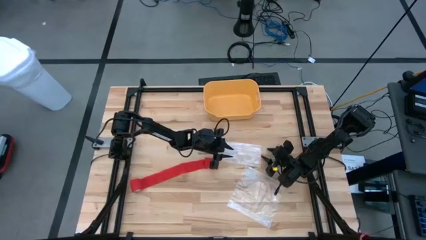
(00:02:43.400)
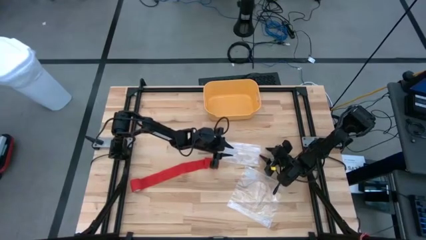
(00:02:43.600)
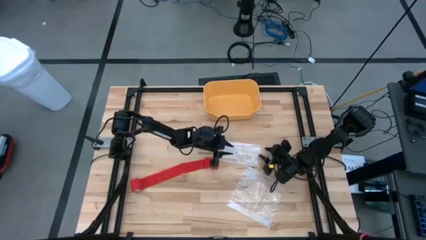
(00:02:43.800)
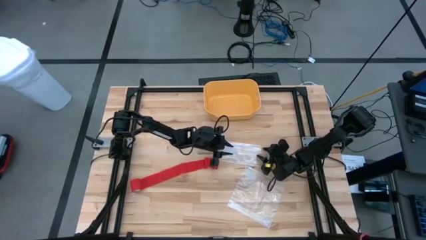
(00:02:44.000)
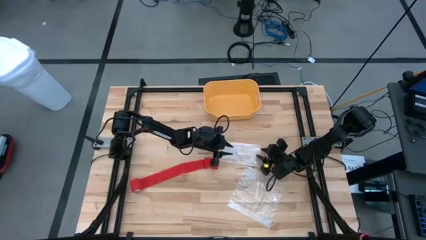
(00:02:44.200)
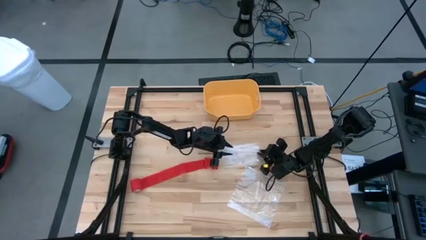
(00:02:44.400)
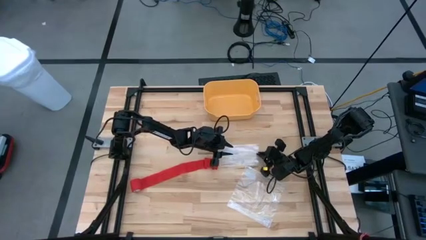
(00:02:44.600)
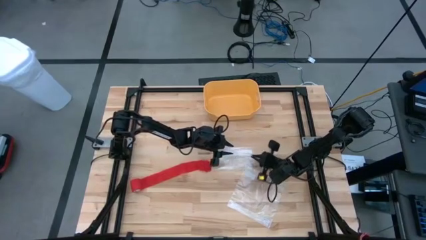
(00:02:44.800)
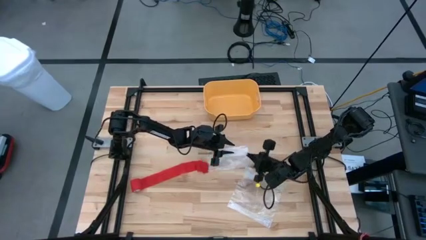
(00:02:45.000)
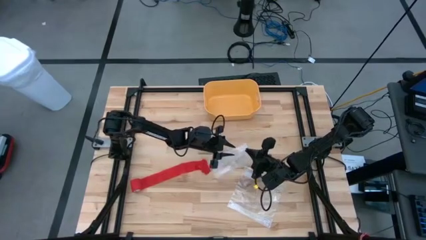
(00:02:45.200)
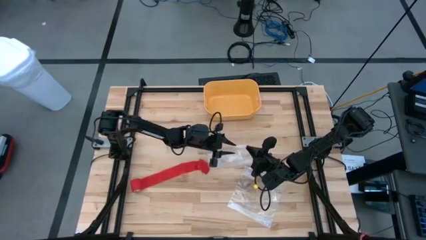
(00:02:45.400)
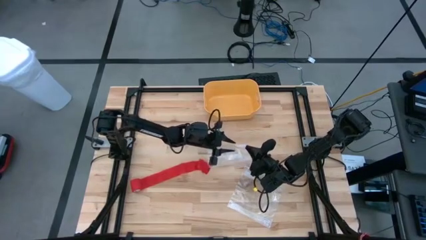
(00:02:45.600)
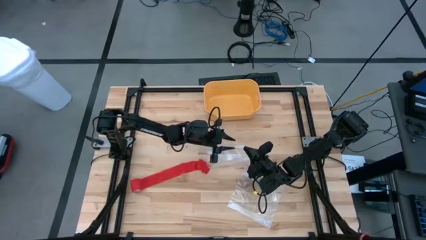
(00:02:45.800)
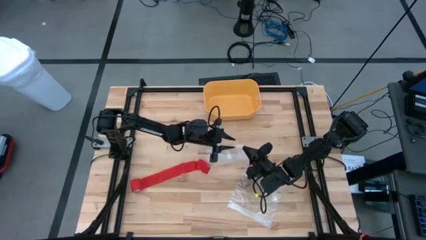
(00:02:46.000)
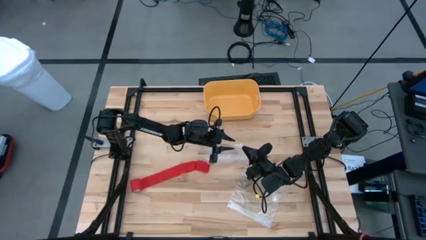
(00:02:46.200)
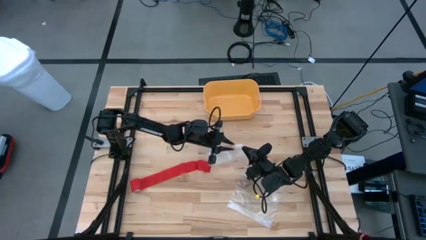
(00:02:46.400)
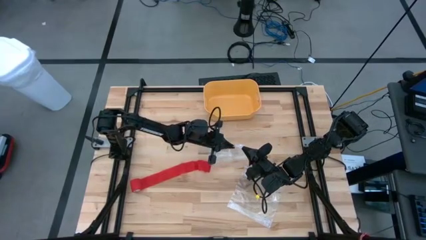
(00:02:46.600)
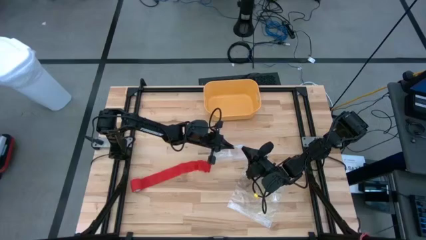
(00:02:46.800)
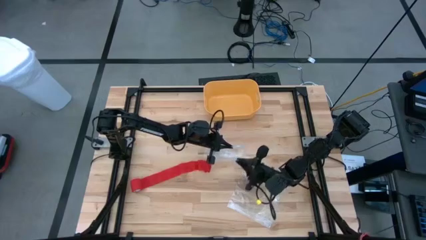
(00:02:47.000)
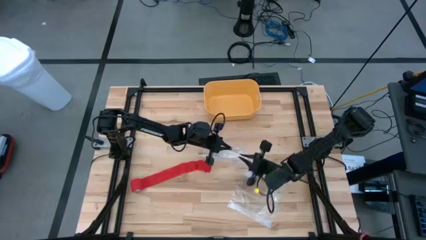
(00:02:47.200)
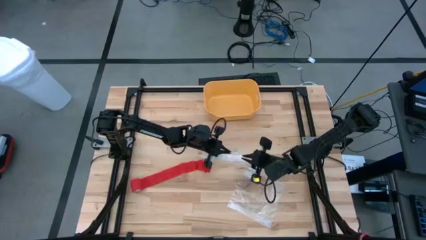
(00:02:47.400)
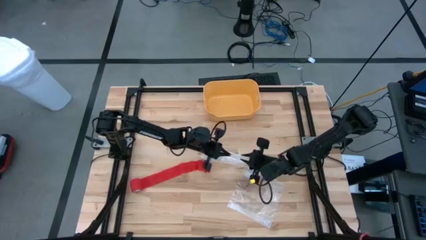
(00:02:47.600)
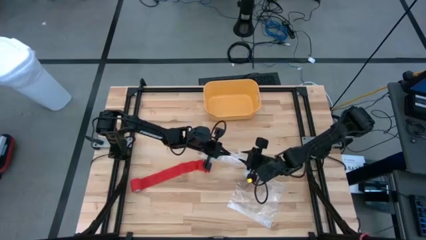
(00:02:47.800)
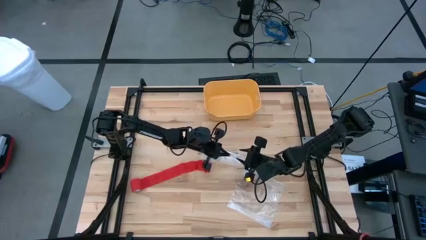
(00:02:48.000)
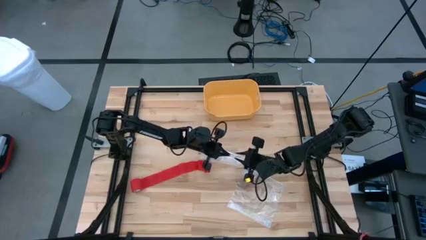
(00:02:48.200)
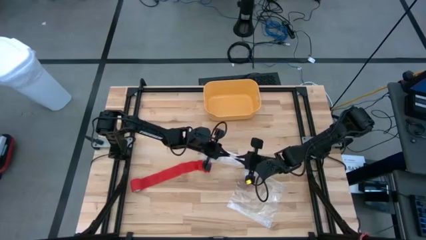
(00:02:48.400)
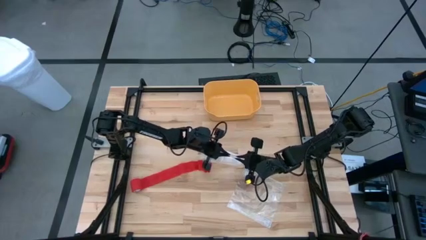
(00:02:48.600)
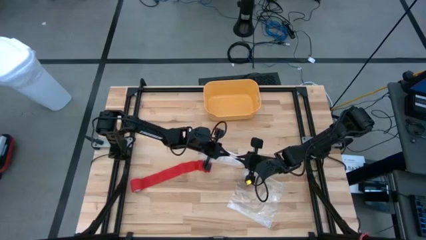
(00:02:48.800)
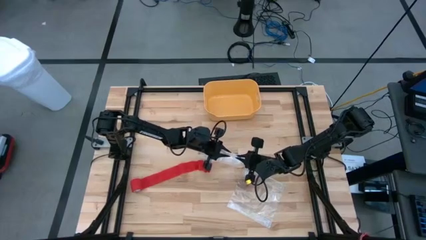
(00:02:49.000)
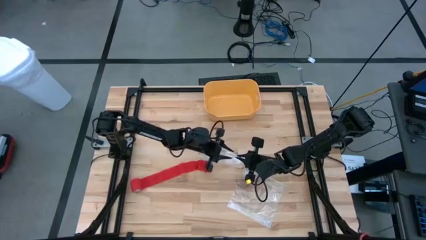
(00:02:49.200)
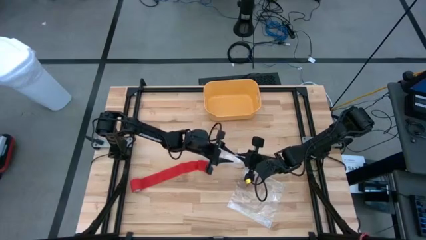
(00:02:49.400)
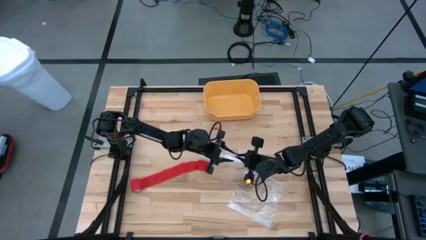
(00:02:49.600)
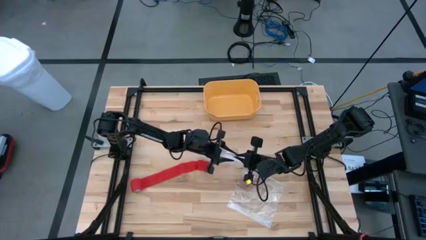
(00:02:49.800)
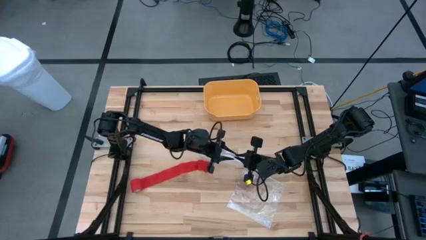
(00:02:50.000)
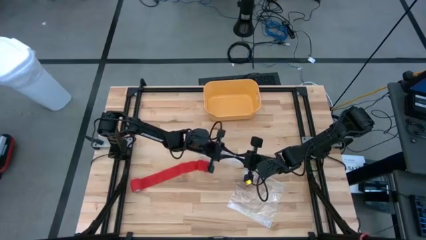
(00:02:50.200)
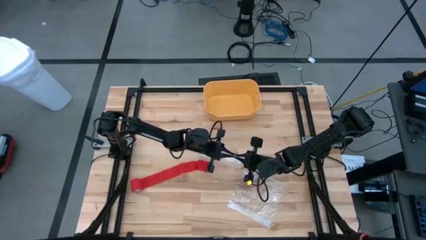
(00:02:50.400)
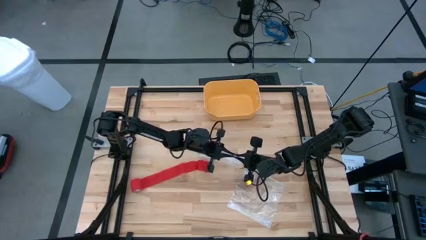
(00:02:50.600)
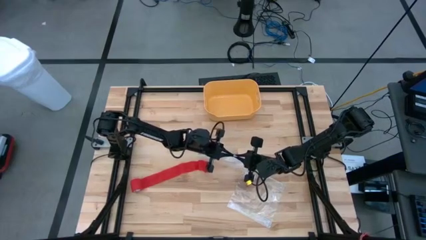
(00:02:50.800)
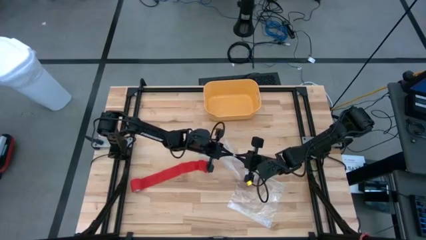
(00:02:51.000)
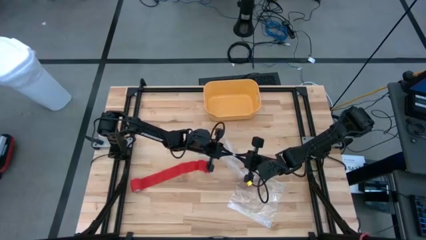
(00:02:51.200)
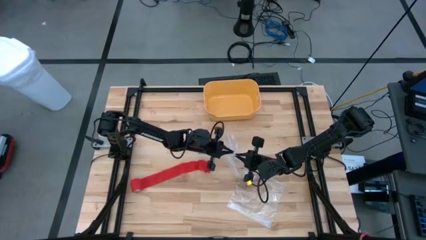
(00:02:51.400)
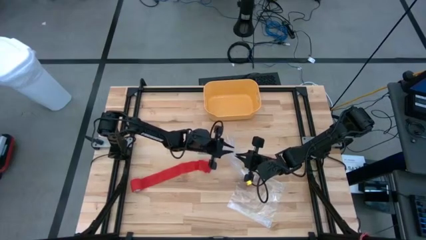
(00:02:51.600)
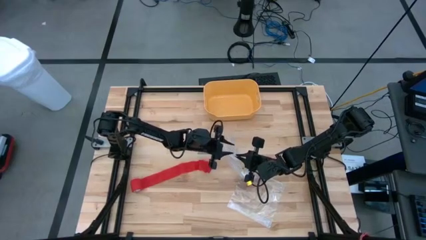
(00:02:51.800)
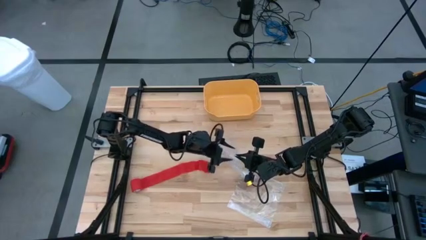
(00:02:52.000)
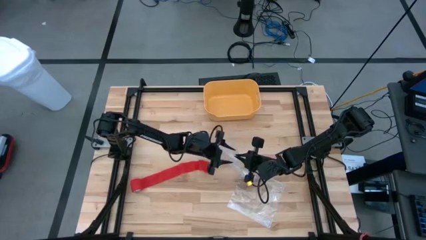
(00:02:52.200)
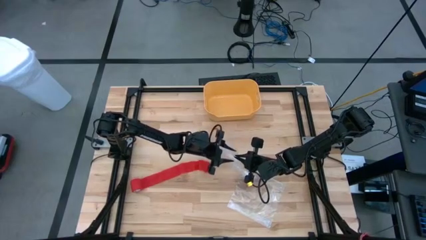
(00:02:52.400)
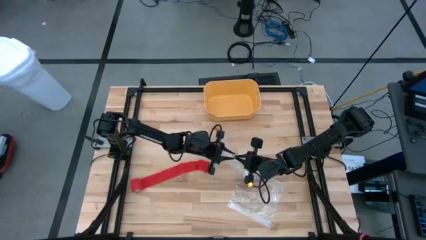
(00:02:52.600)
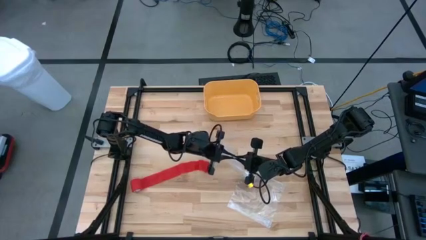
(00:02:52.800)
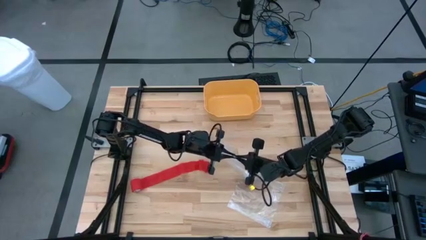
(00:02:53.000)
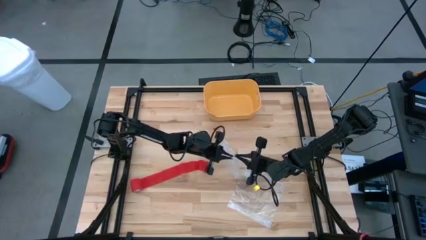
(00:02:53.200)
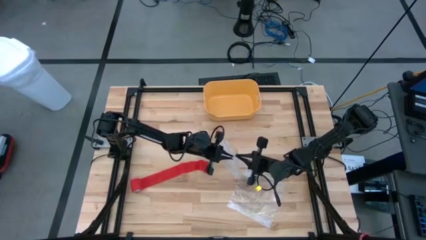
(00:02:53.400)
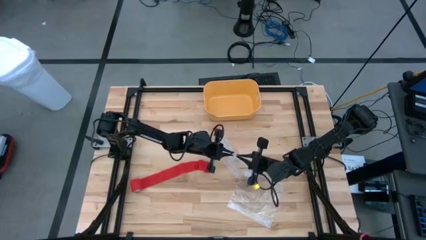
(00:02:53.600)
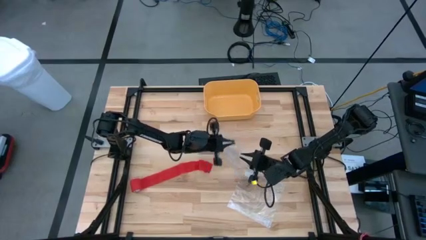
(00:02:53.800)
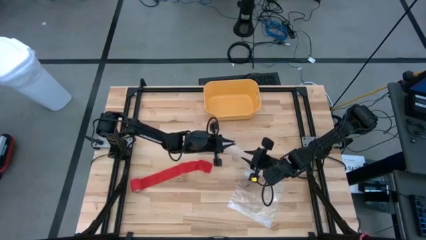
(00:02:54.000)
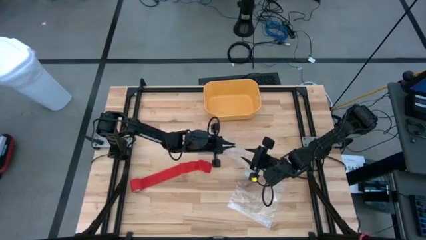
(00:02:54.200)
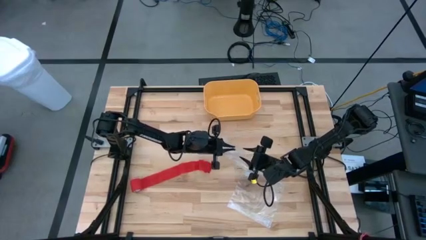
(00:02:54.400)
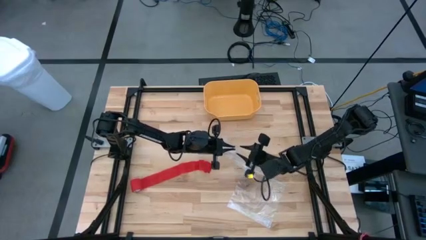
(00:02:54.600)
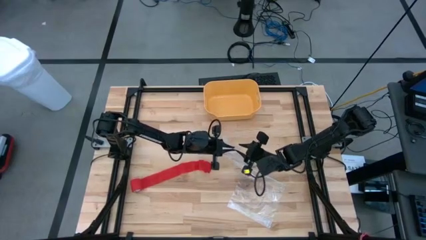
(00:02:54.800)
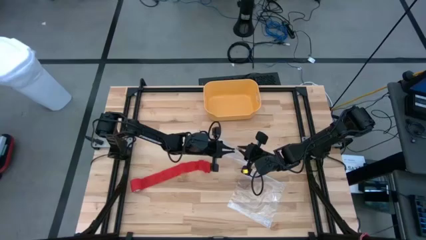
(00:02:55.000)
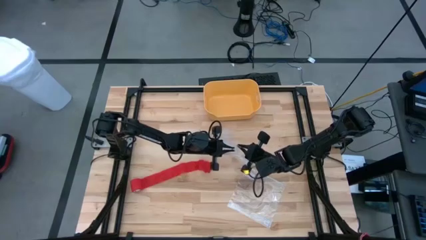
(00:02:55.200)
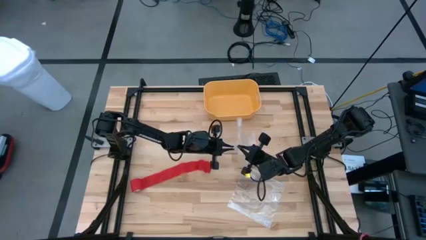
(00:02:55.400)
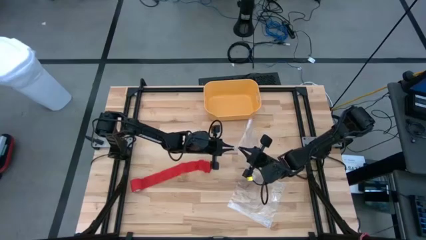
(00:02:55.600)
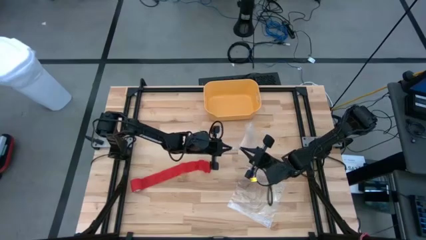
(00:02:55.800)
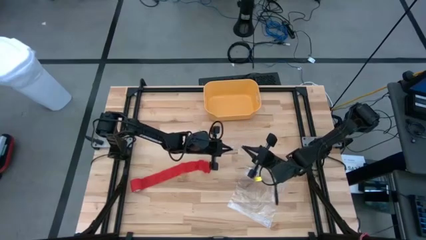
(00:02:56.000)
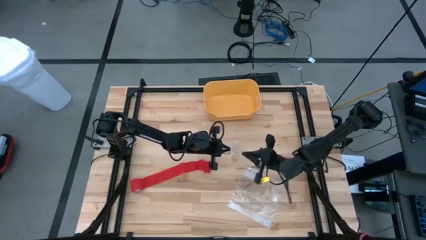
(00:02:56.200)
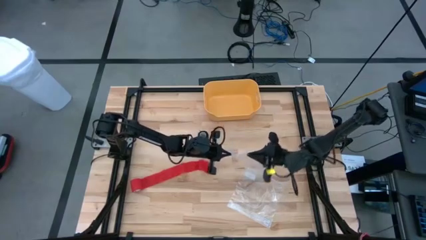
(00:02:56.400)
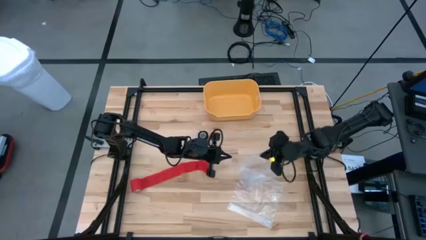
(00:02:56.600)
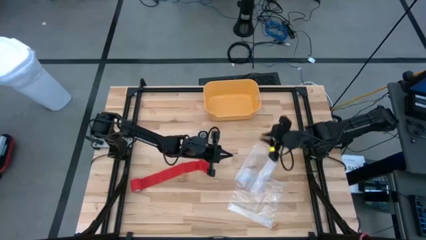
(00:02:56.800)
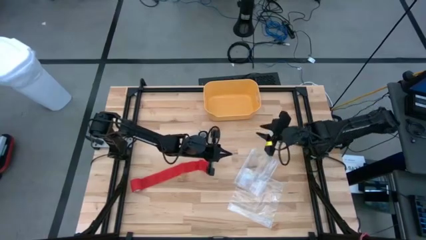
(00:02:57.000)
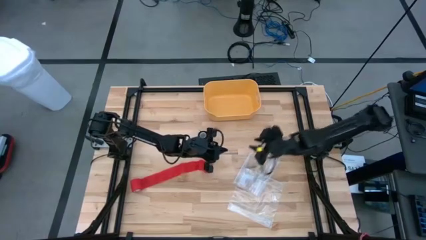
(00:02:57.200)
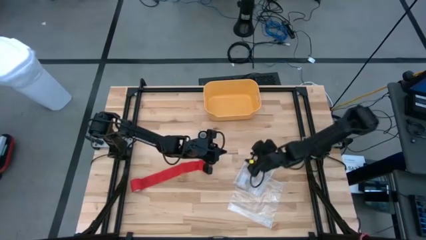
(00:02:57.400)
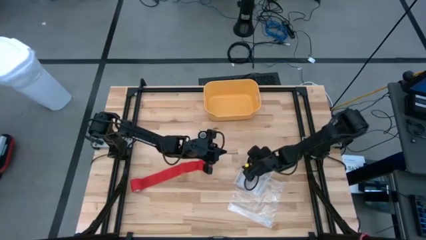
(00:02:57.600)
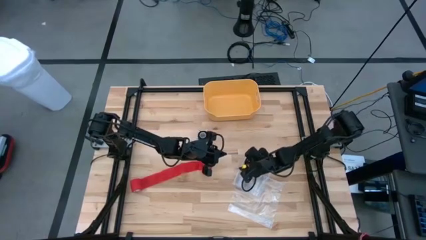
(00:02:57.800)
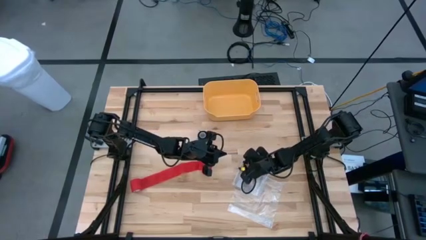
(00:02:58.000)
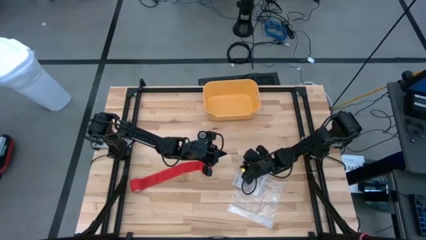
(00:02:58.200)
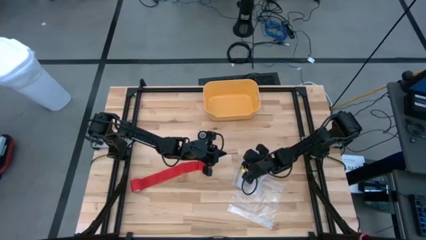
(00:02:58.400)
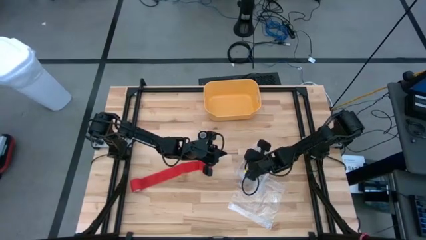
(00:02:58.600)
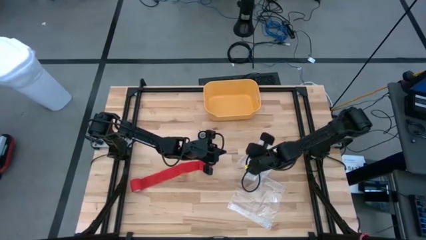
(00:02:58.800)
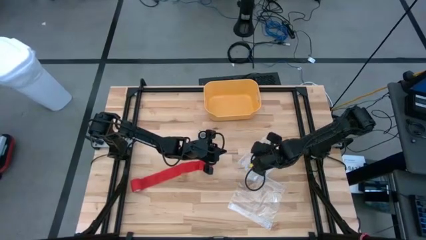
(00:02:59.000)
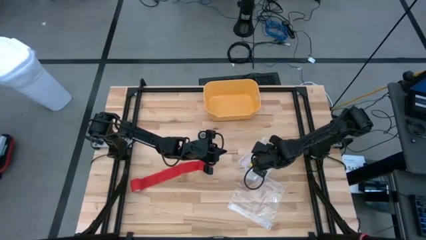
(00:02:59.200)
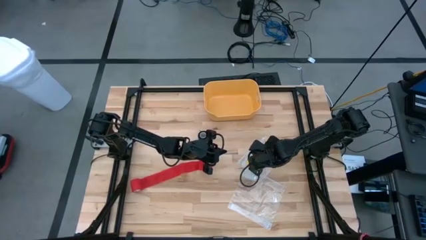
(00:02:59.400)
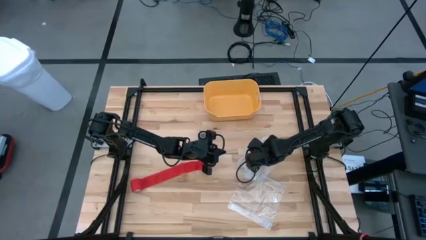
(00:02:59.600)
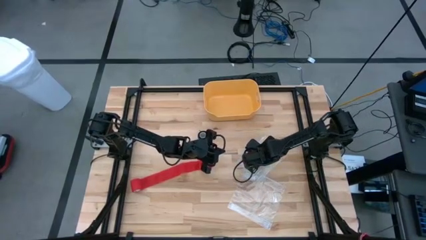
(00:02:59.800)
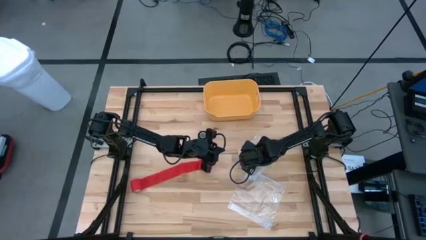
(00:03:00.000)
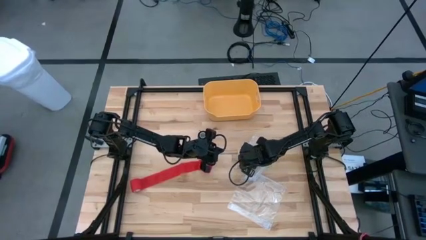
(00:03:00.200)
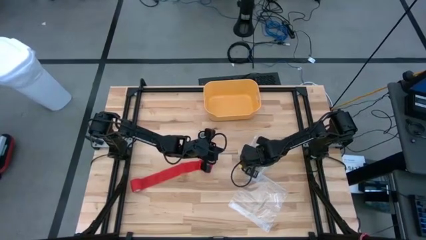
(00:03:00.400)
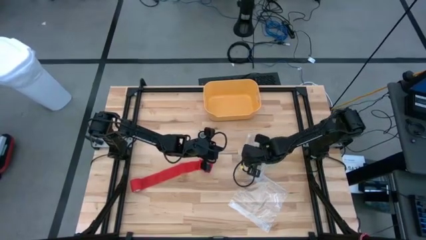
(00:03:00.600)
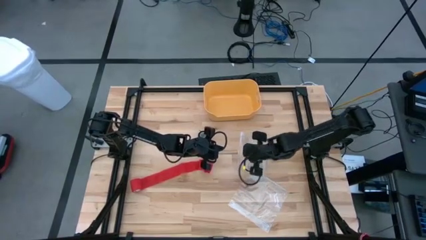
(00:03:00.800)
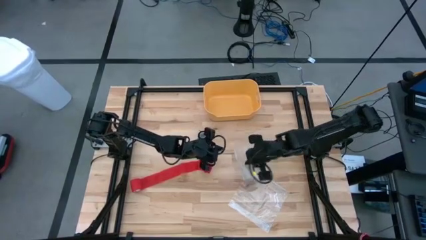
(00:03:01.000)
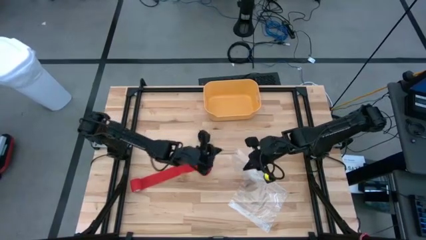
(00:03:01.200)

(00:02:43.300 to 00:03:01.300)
Task: Roll bandage
Open the transparent zip bag
